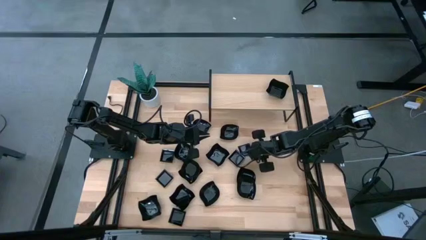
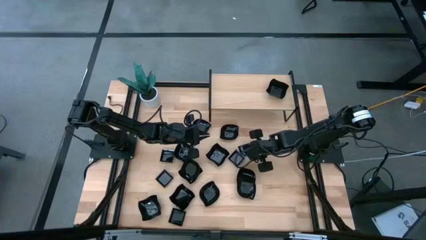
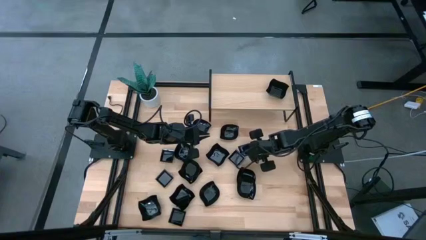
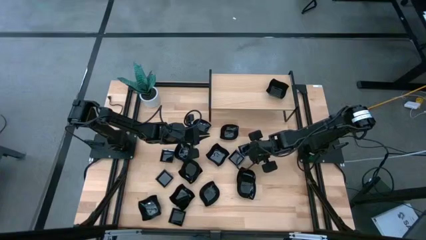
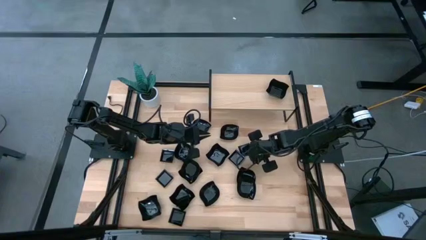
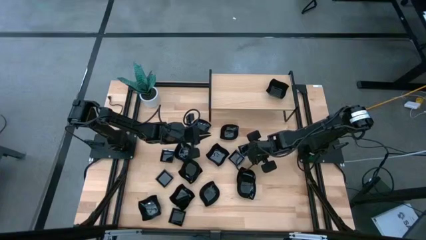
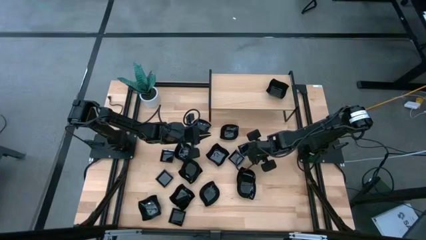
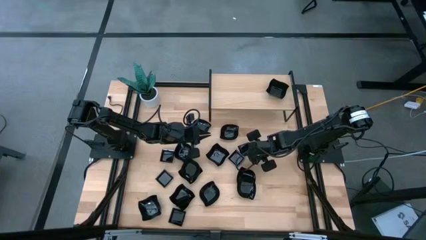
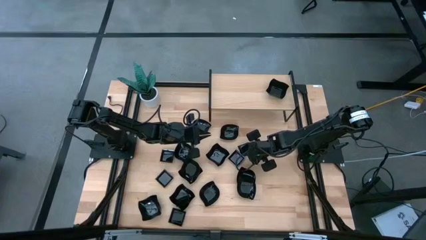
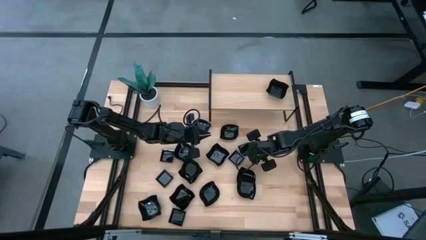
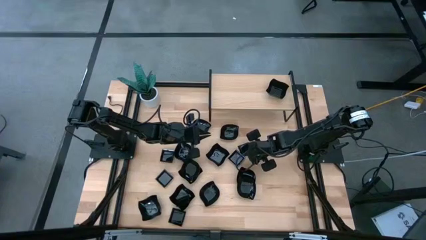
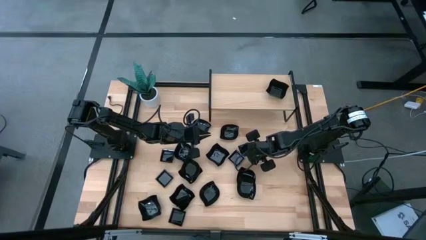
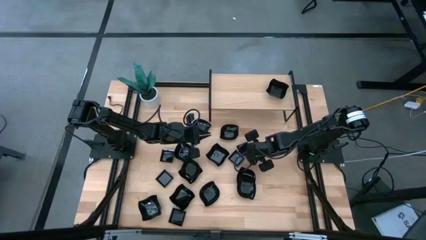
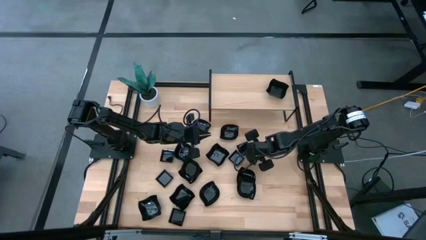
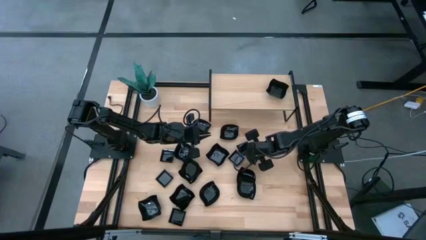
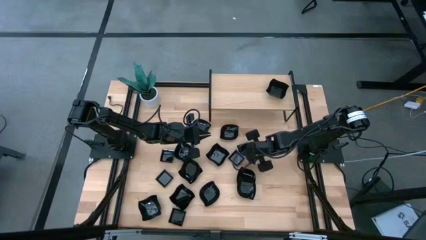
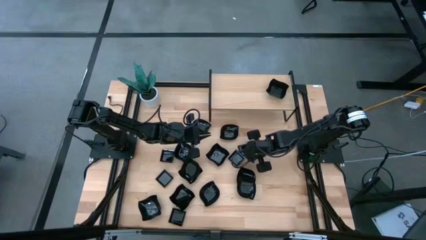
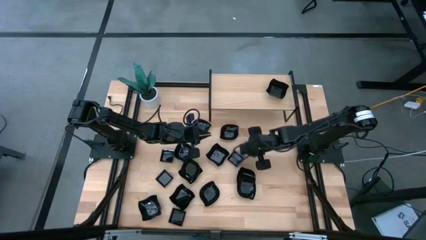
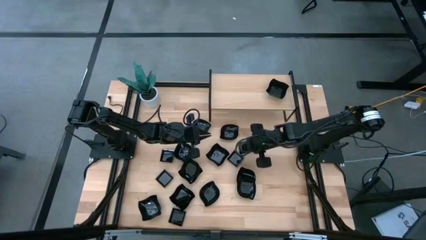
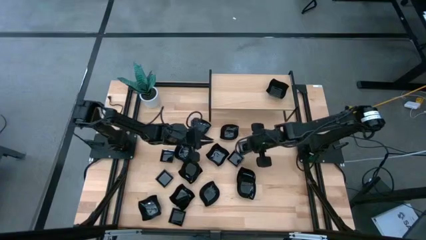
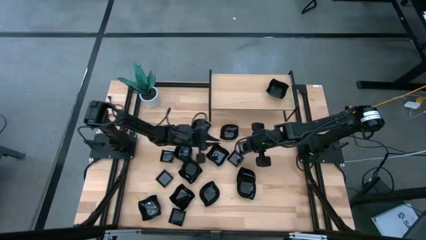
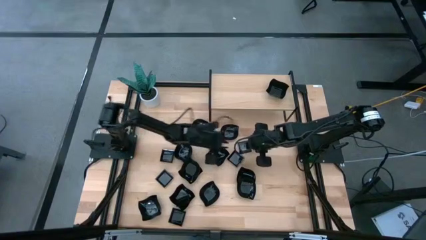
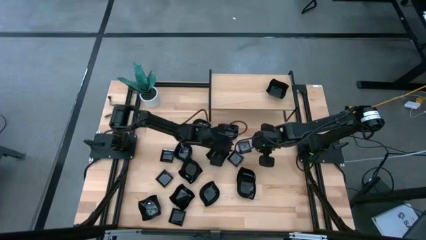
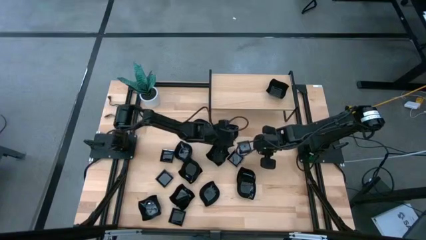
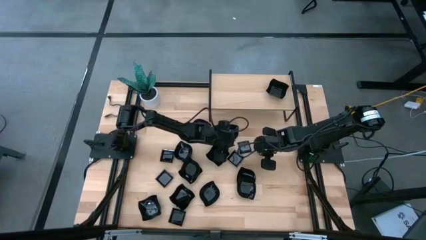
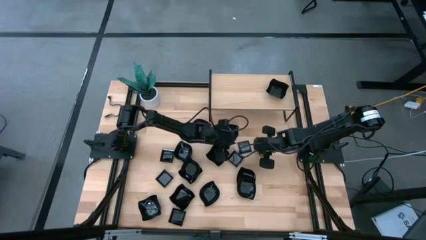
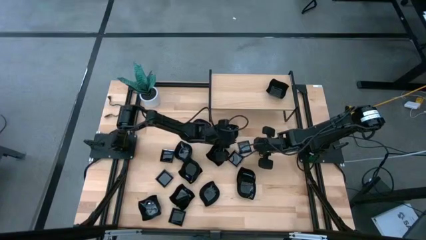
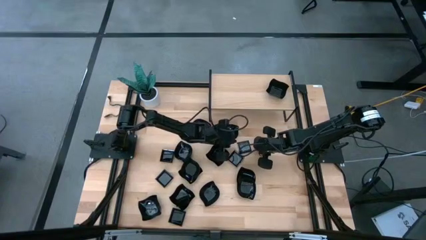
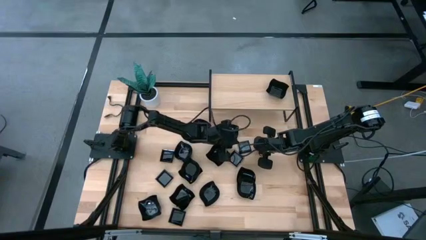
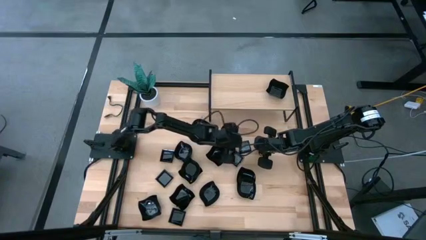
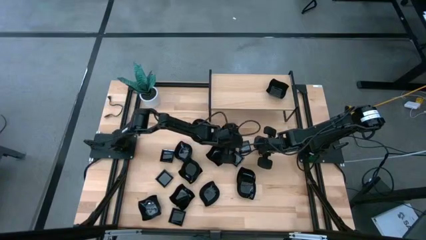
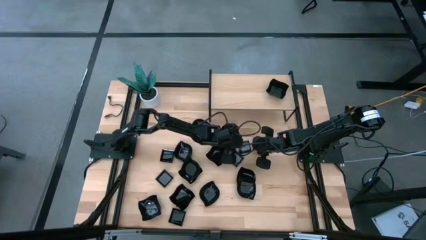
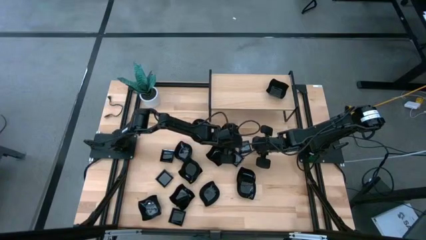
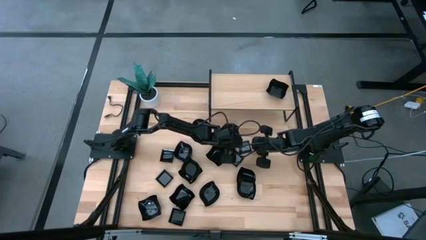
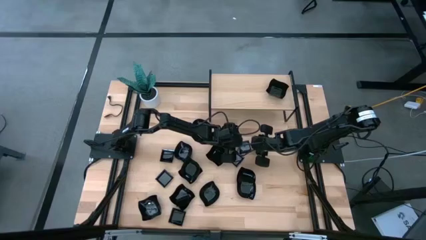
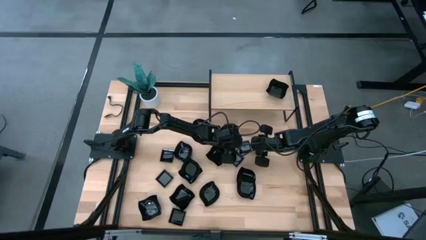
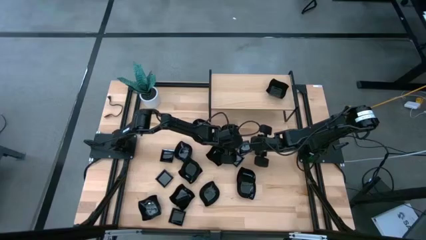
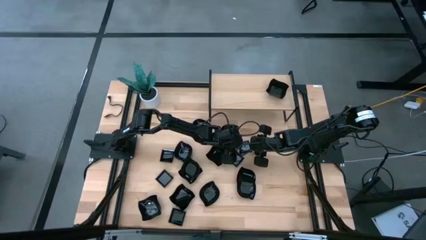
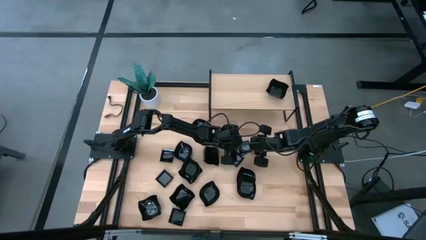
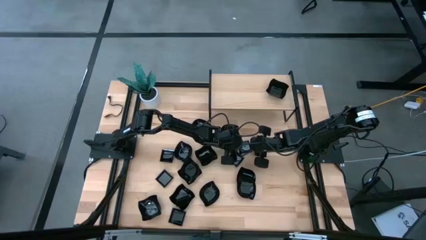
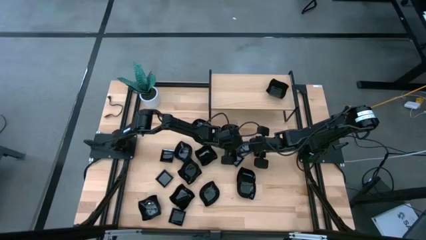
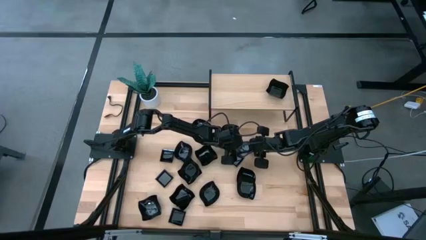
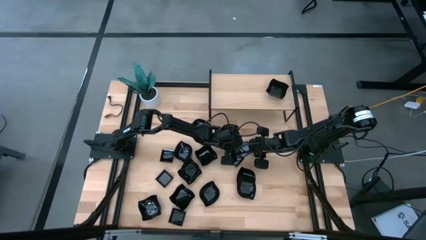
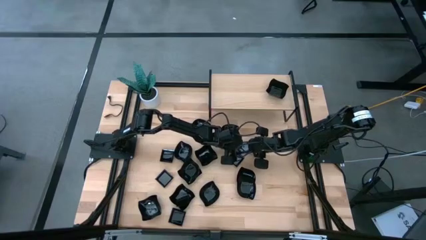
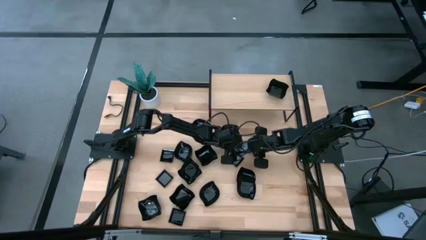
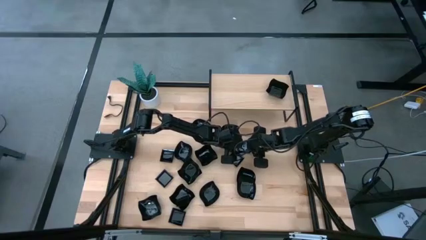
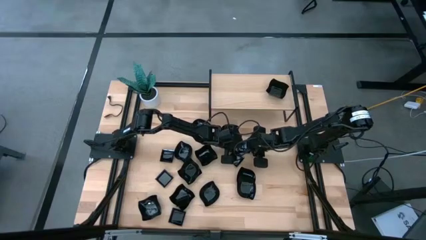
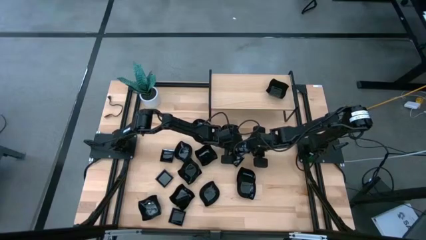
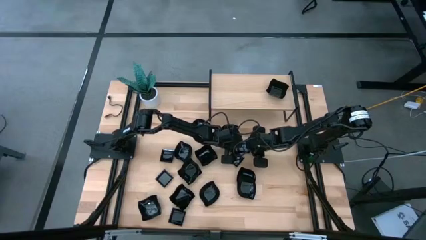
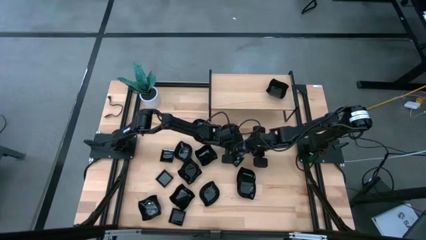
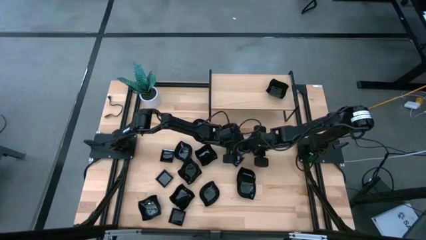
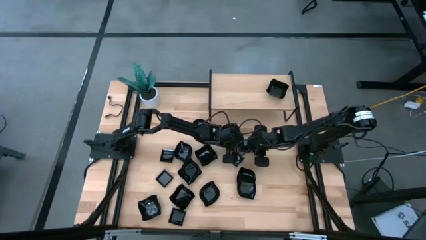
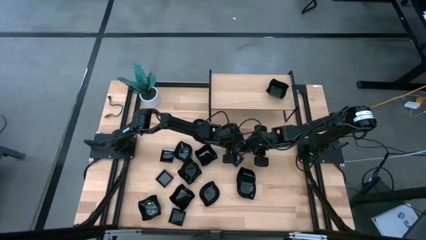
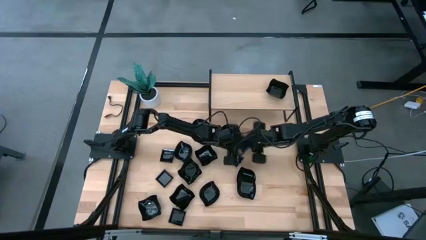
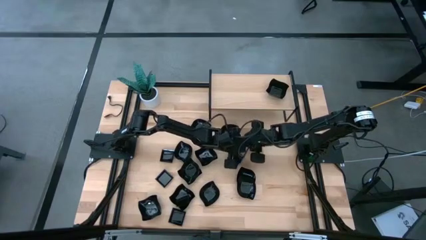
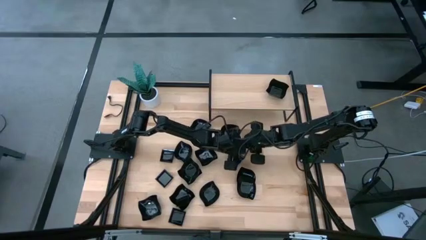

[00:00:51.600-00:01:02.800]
Task: Pick & Place Mini shaped plates
Put the black square plate on the shelf

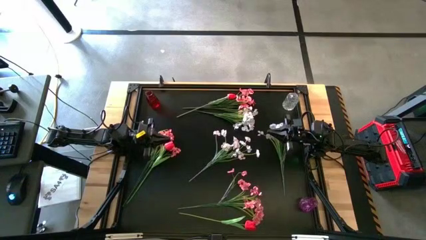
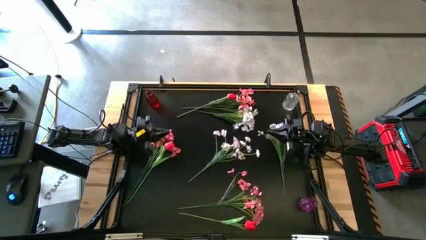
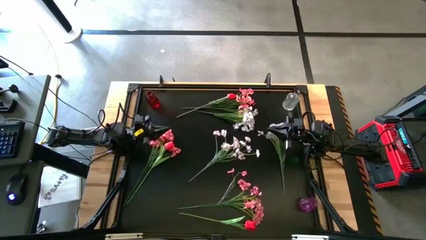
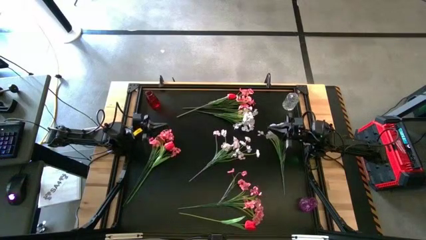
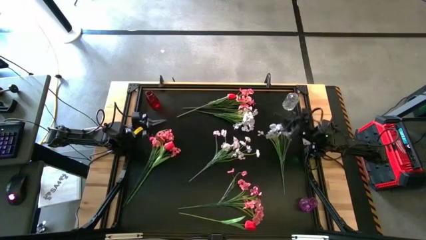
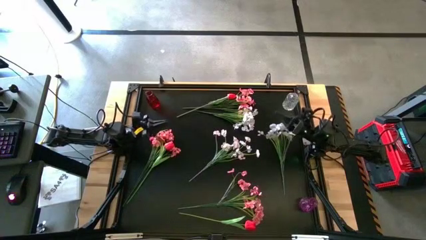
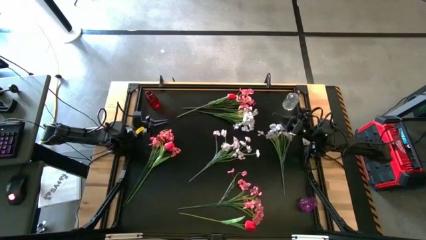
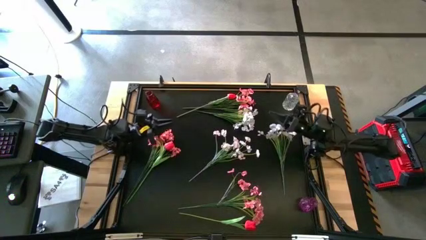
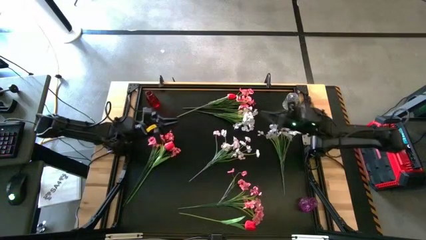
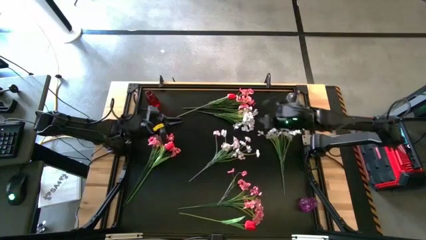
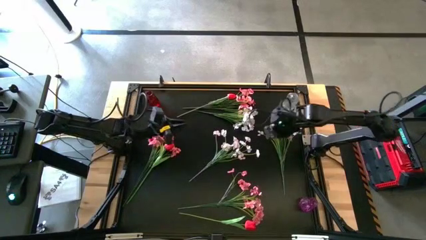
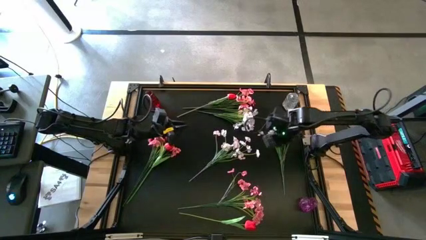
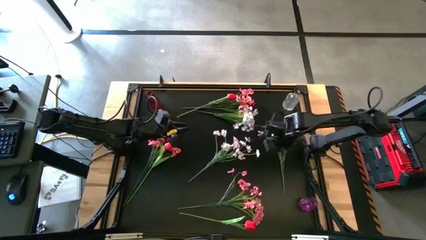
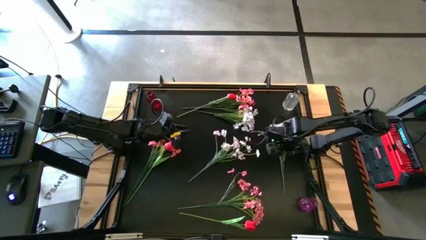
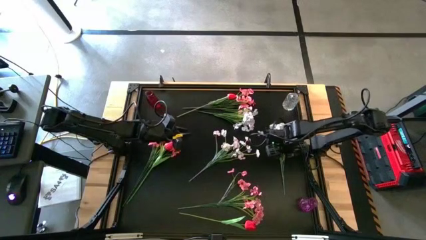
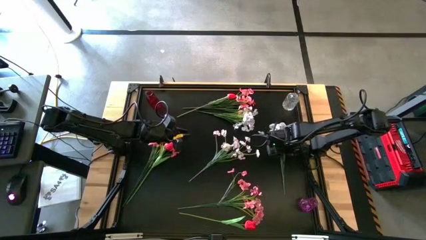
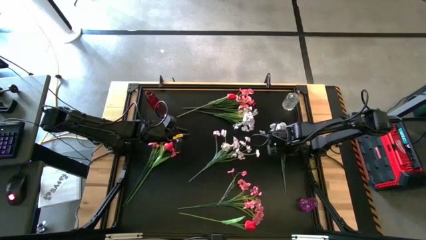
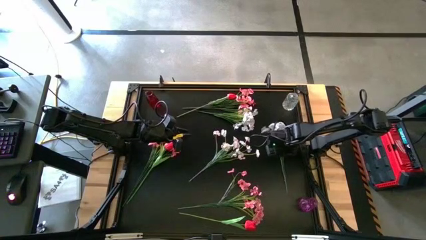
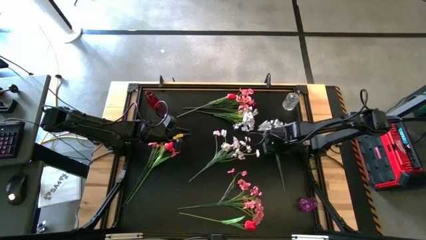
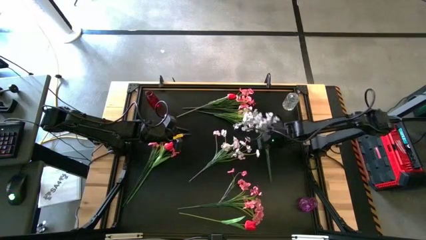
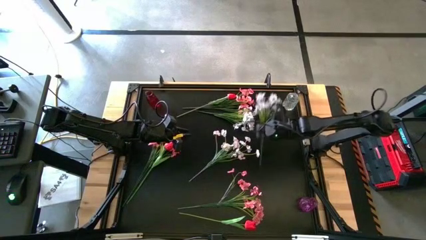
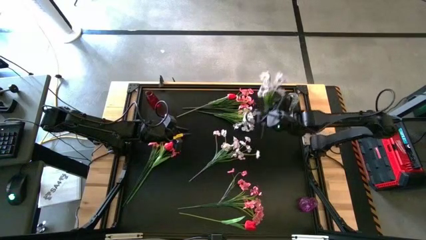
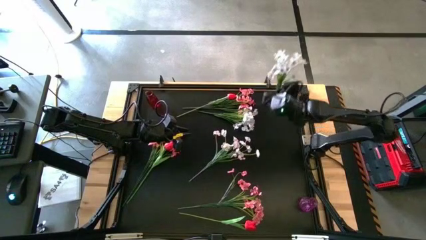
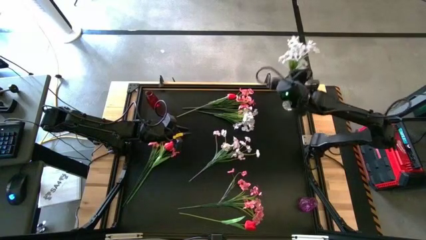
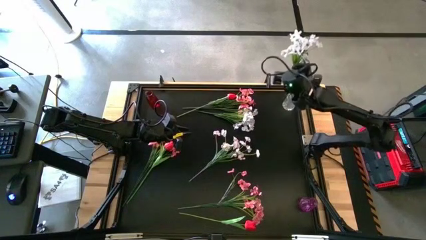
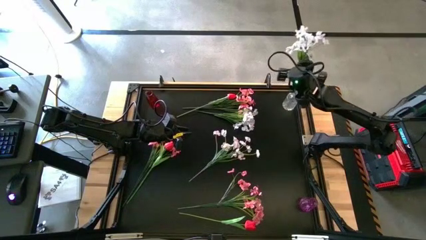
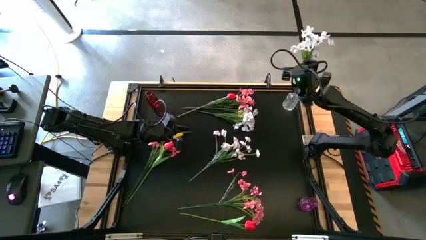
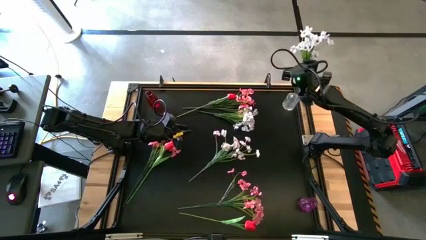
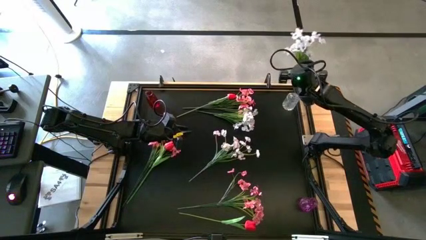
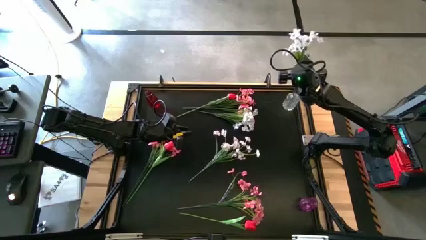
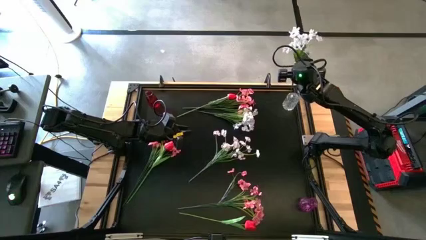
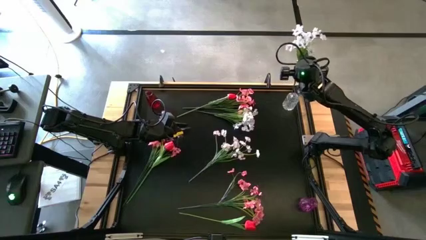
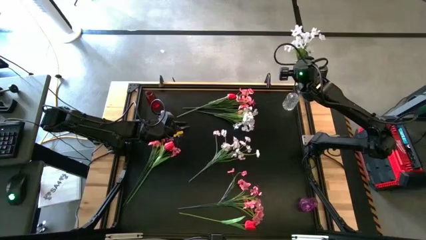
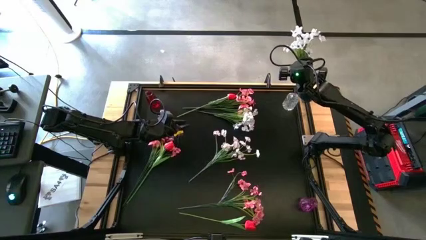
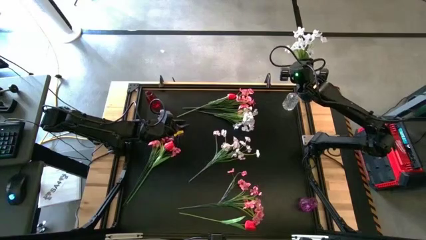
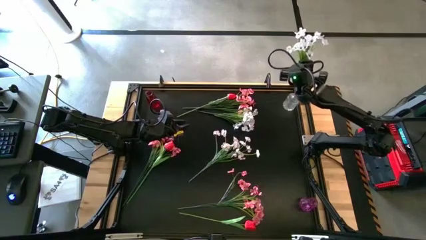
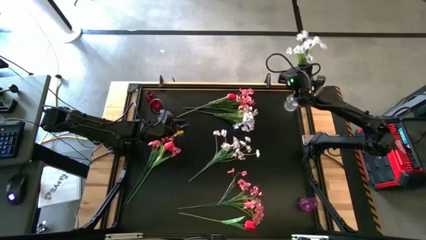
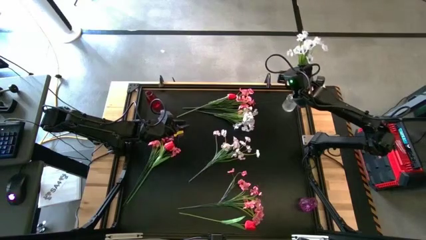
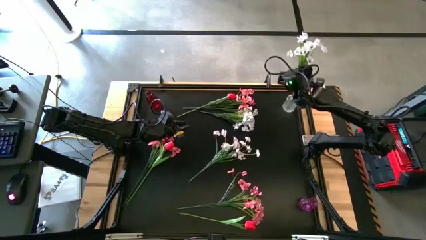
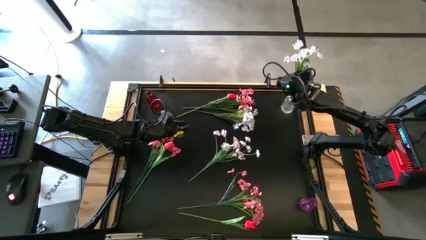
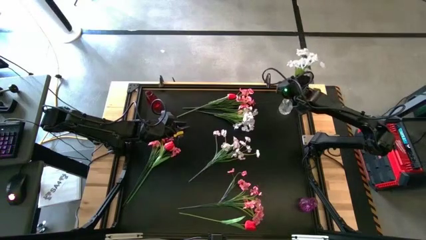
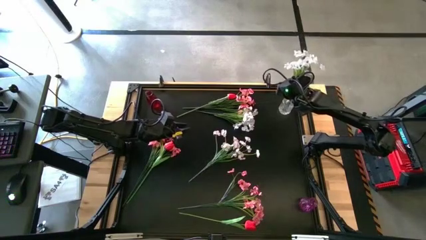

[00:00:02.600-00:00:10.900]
Task: Sort flowers into vase by color
Put the right white flowers into the transparent flower vase
